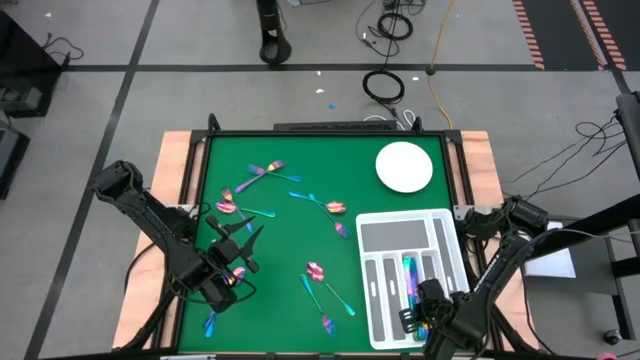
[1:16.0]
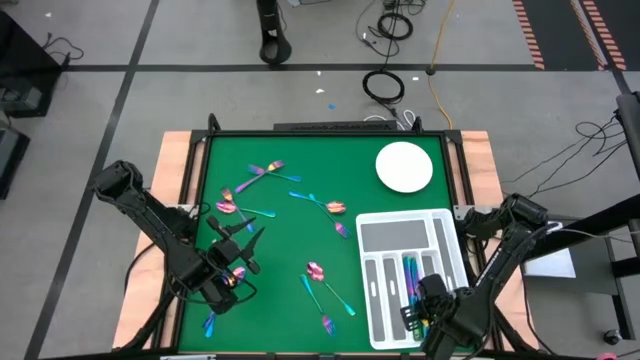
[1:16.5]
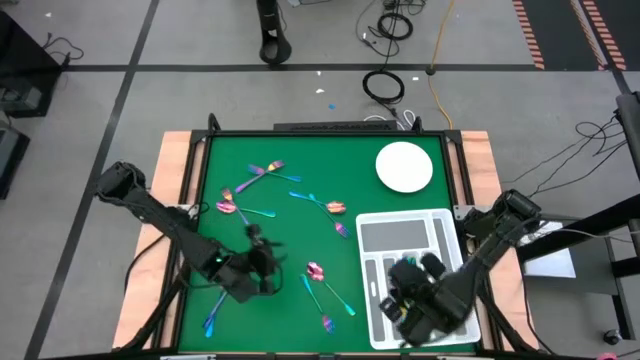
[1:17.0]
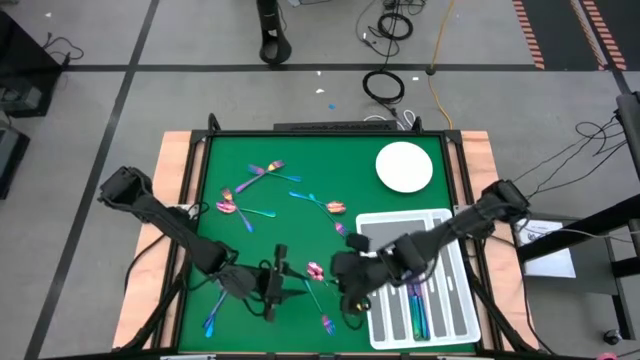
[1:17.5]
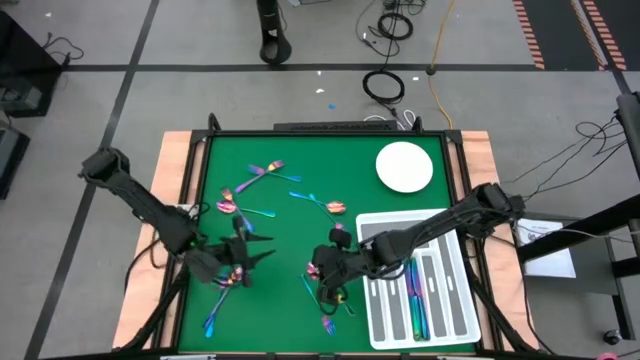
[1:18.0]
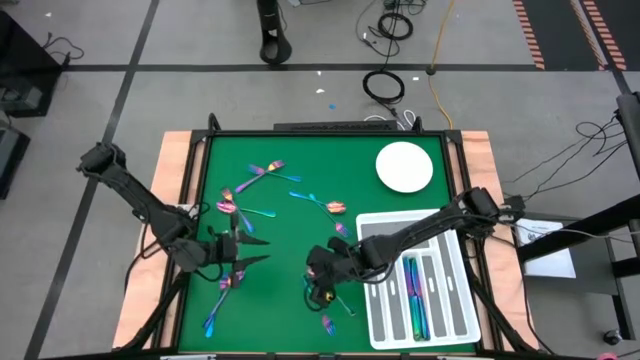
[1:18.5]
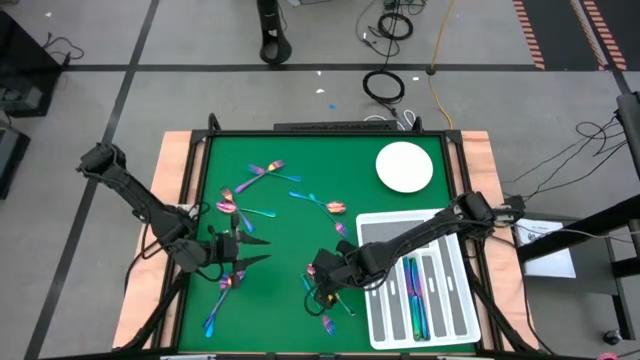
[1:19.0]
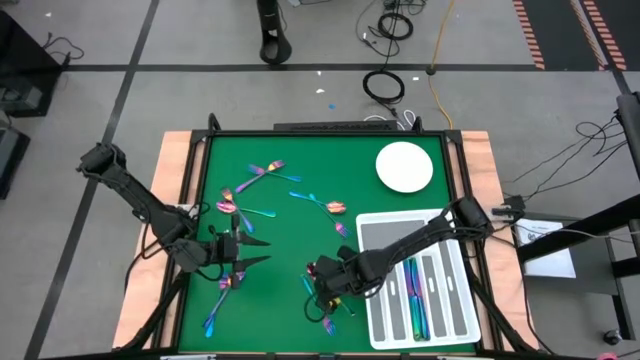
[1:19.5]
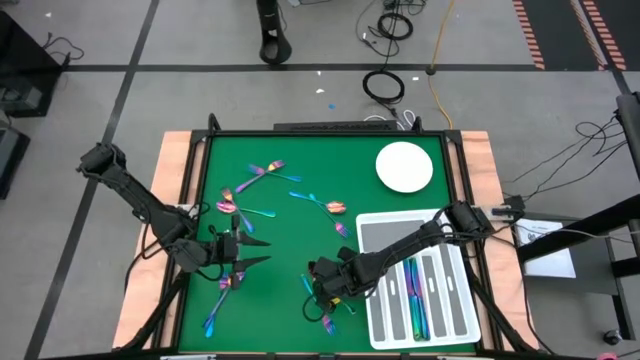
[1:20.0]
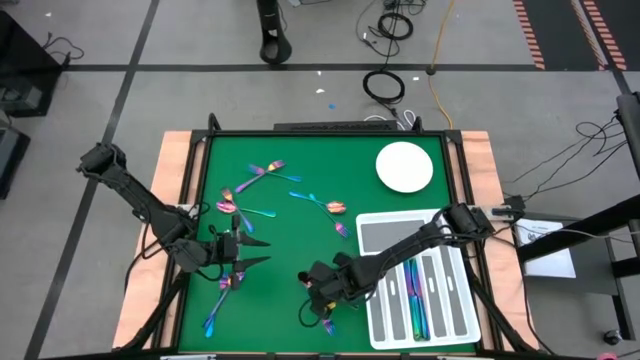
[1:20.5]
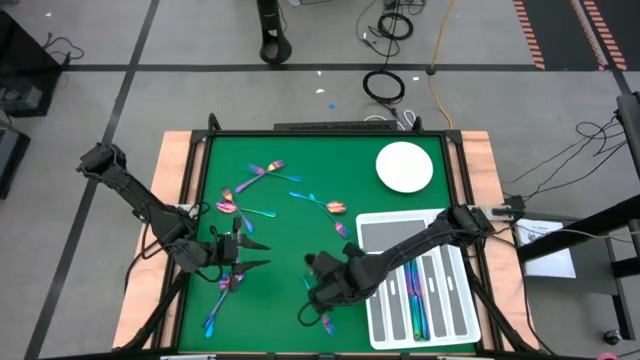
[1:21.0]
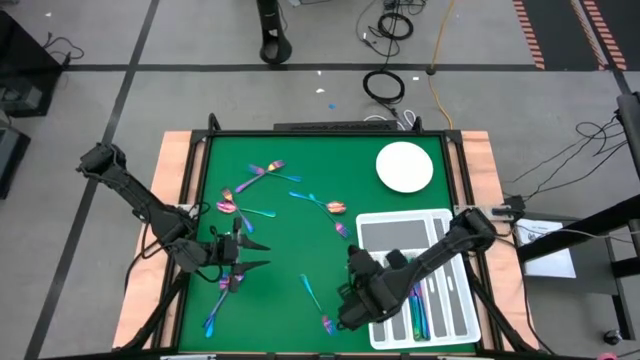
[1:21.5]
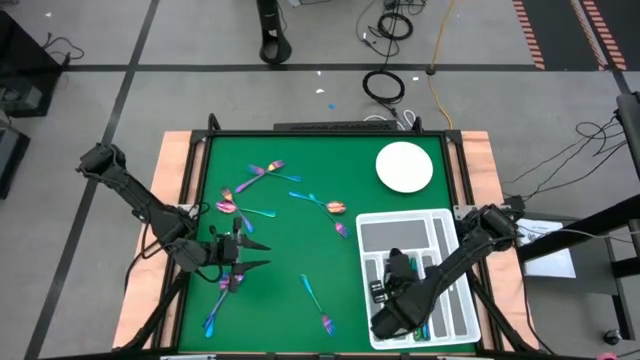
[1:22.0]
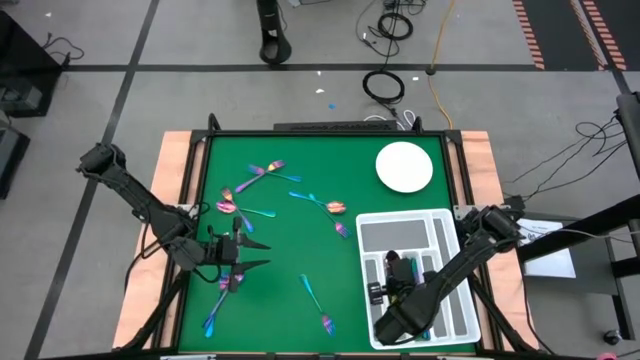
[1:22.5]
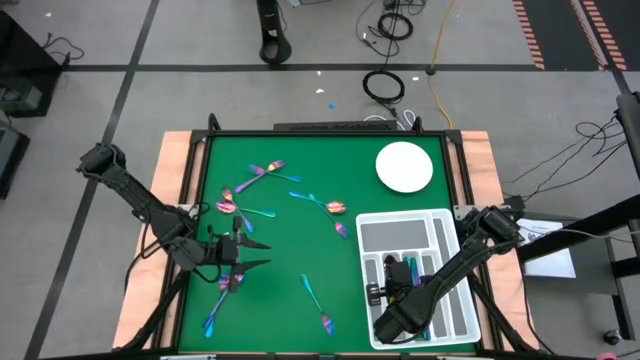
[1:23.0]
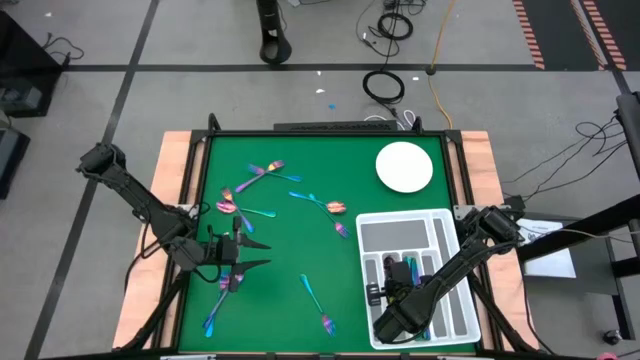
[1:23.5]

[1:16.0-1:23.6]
Task: Sort silverware
Put the bottom right spoon into the utensil organizer

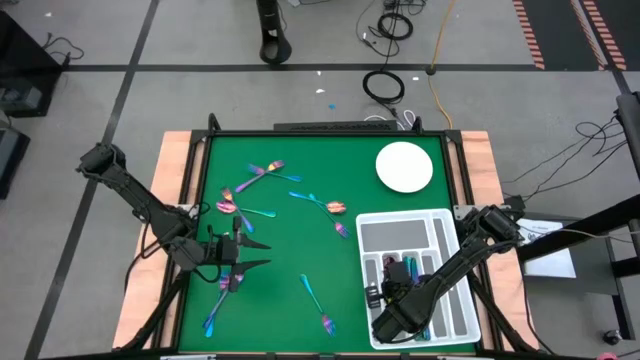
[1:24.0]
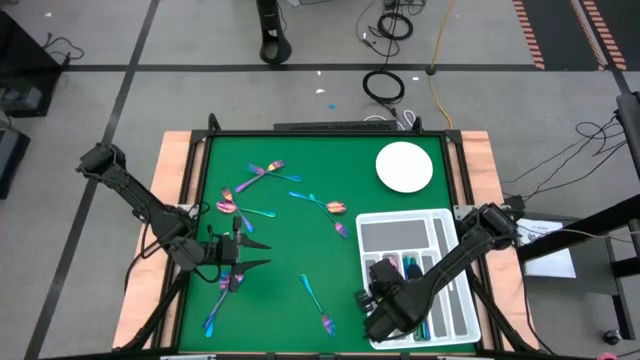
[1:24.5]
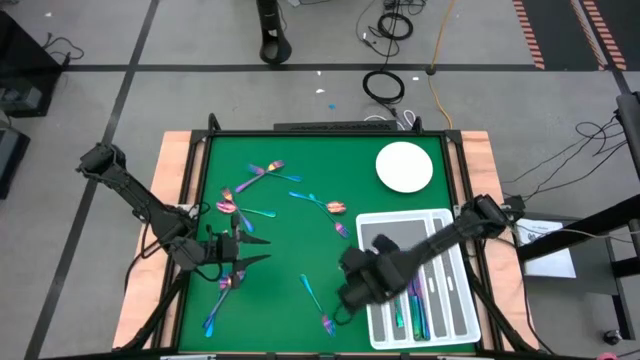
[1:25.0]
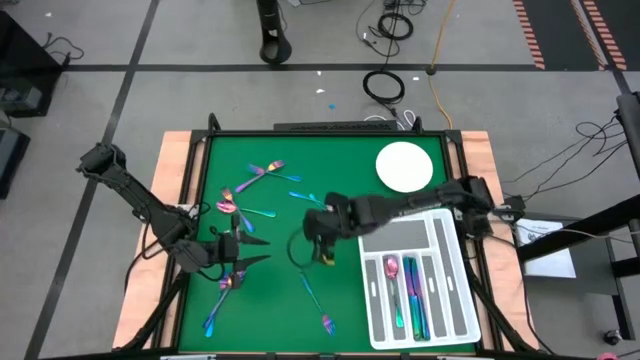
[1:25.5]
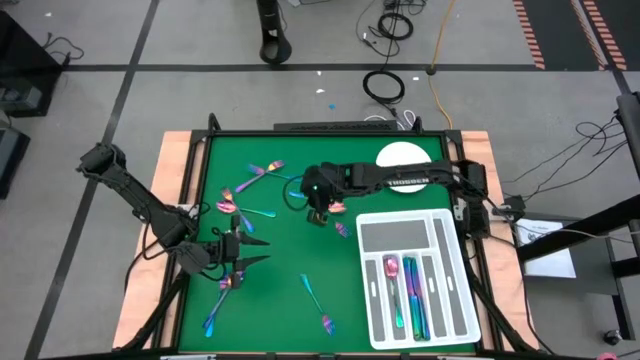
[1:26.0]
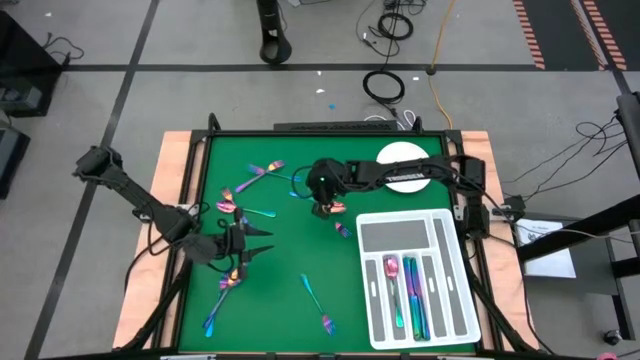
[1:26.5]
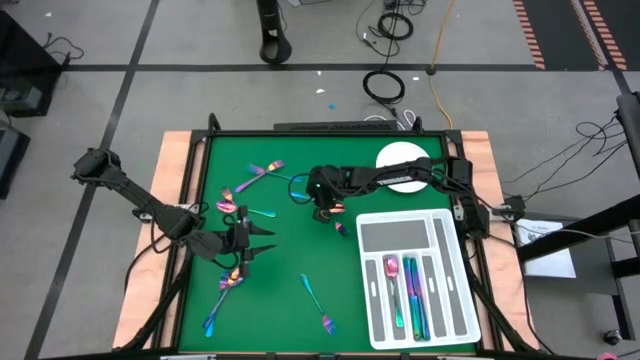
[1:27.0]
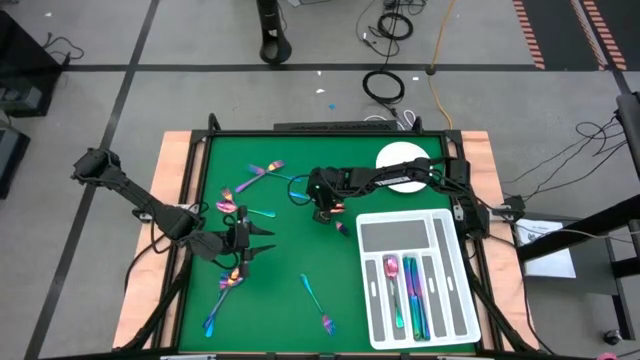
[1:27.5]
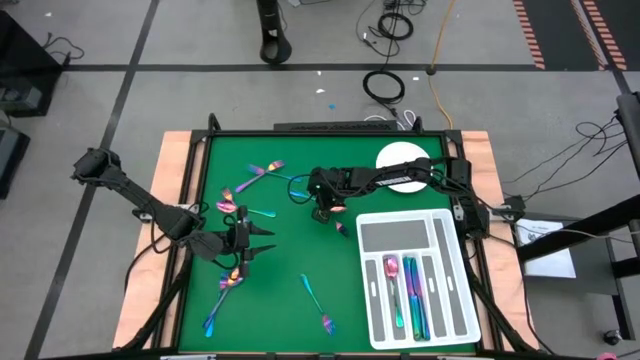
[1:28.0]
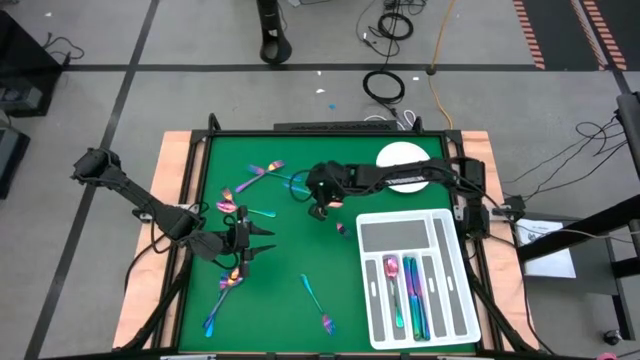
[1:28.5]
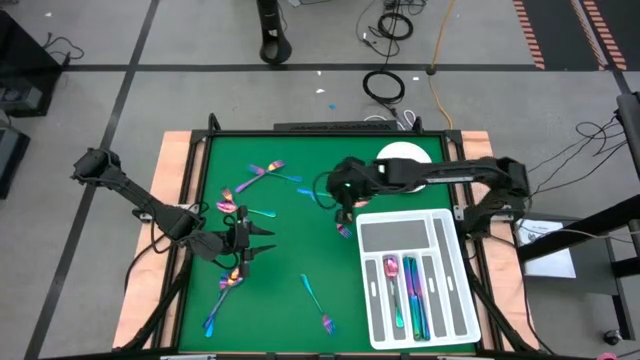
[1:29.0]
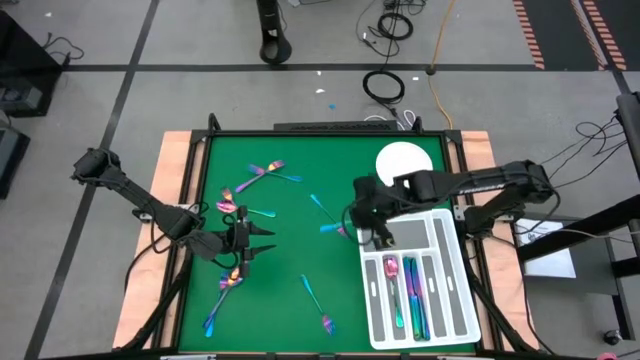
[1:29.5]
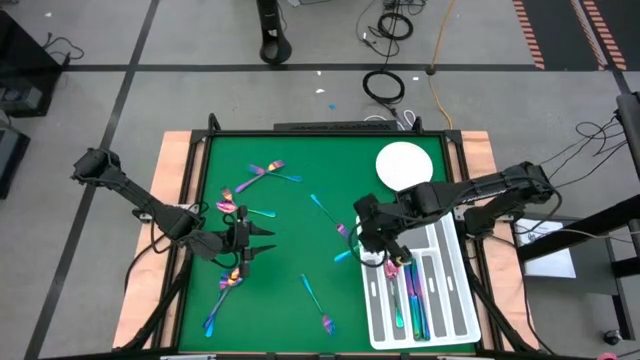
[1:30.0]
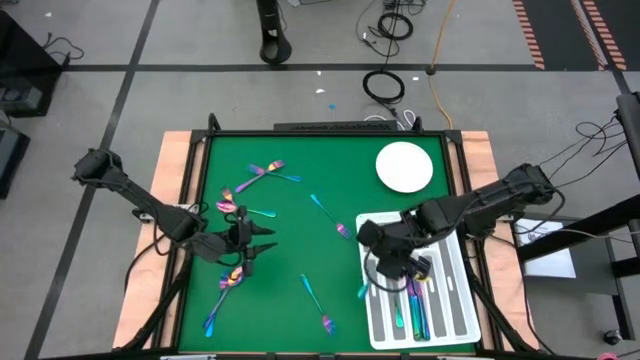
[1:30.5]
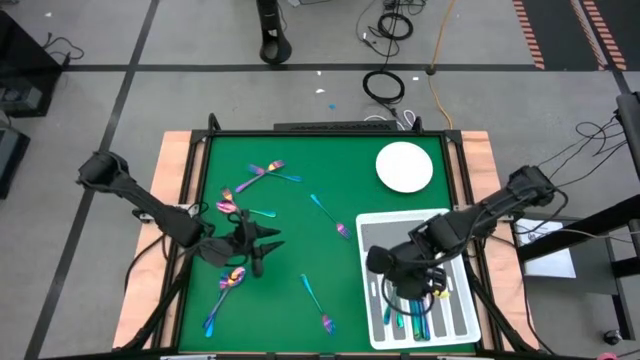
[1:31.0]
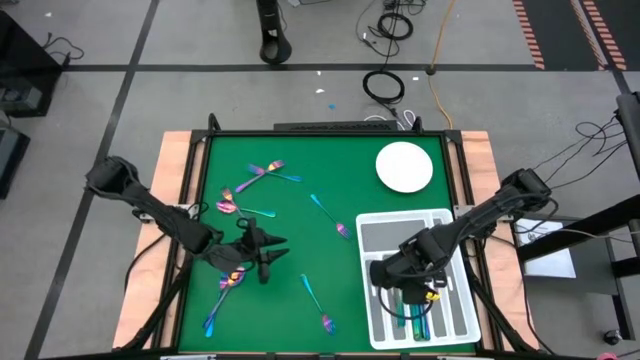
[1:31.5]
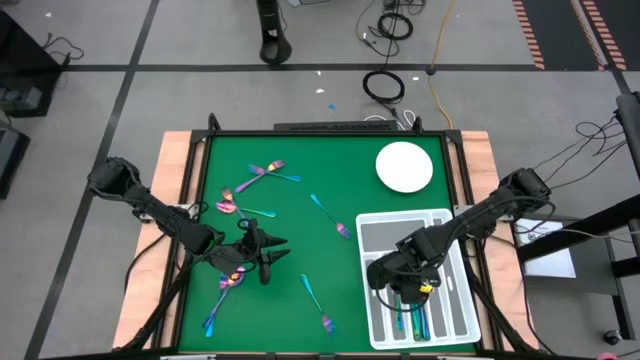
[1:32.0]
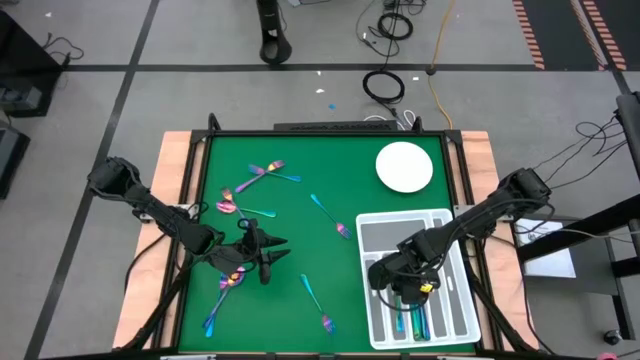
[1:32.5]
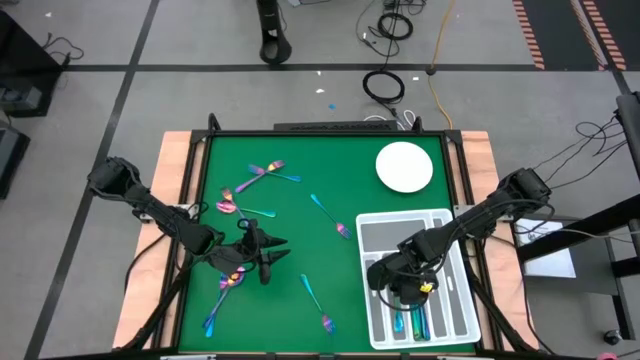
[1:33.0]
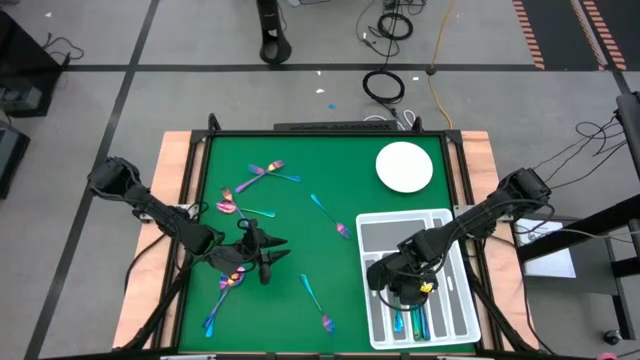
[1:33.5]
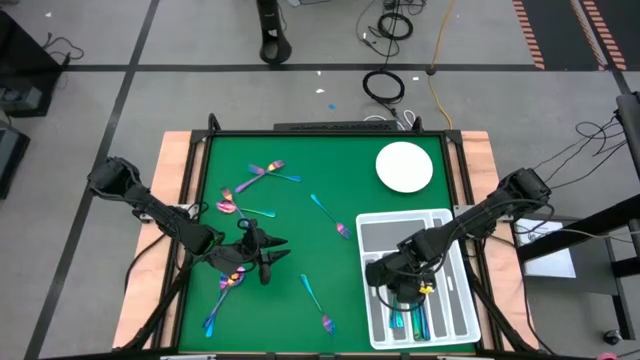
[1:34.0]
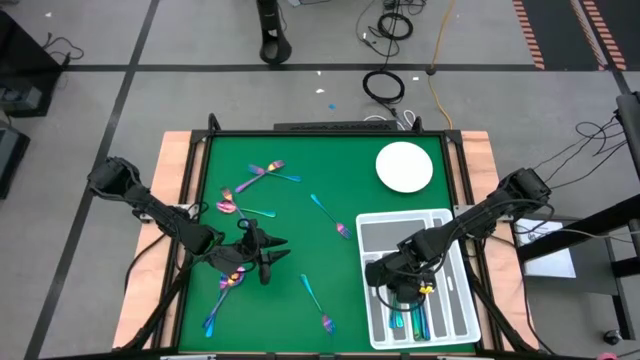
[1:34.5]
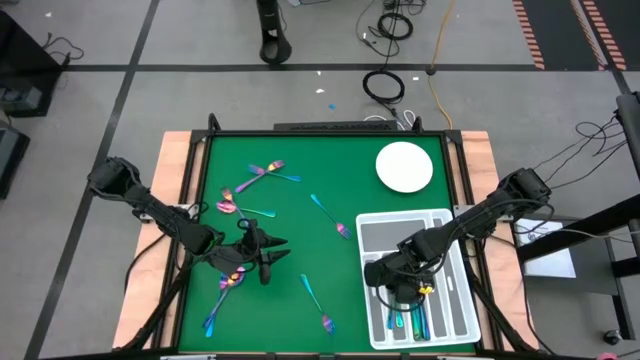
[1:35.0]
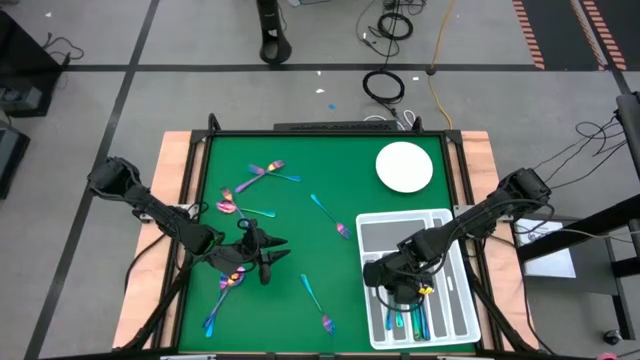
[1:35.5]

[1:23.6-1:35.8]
Put the top right spoon into the utensil organizer
